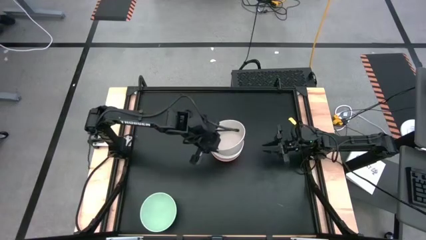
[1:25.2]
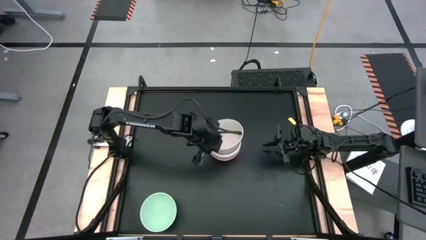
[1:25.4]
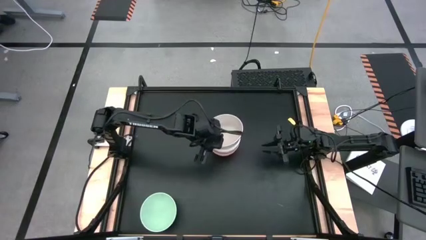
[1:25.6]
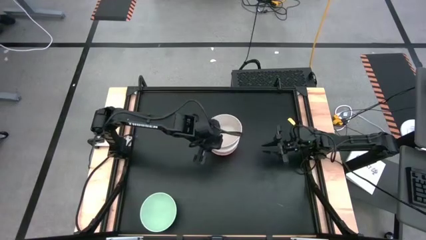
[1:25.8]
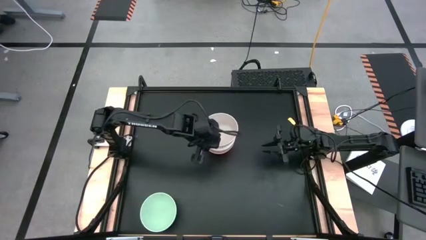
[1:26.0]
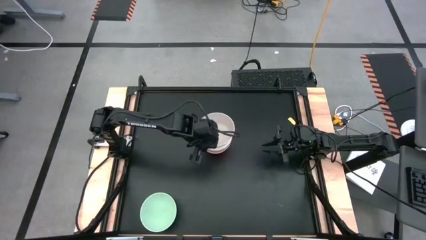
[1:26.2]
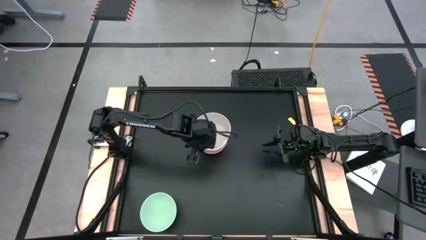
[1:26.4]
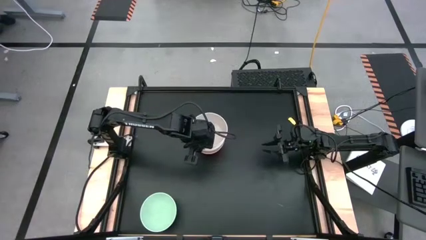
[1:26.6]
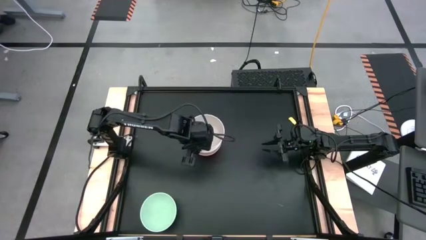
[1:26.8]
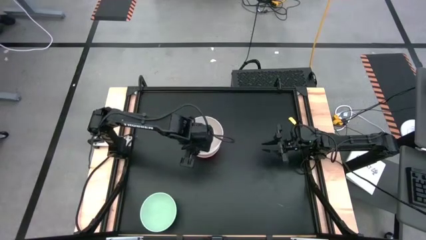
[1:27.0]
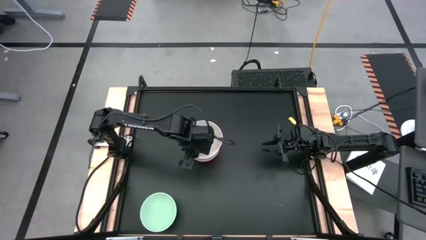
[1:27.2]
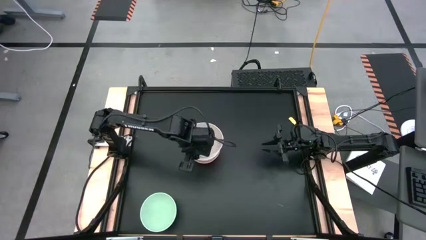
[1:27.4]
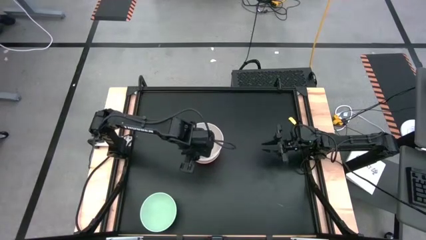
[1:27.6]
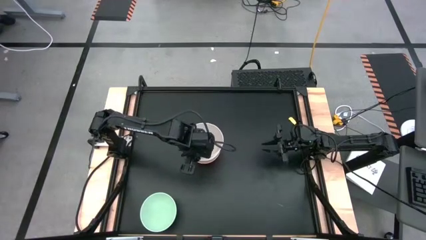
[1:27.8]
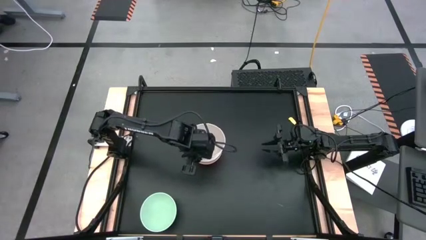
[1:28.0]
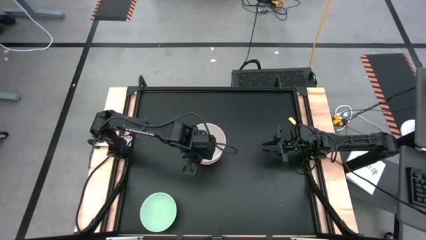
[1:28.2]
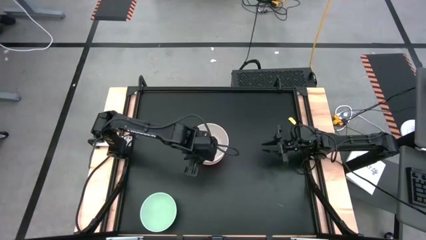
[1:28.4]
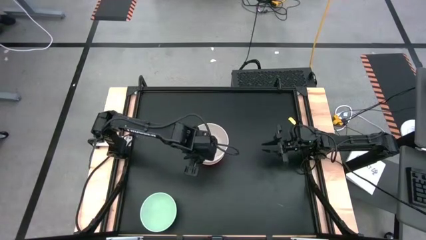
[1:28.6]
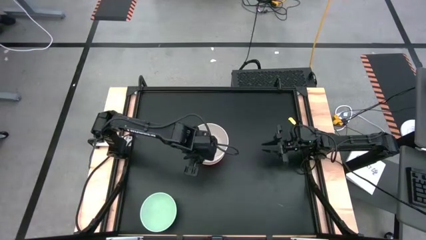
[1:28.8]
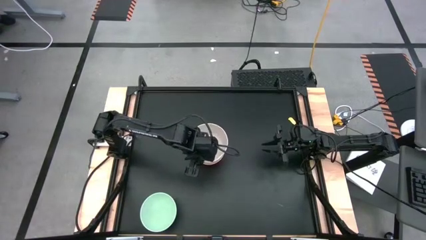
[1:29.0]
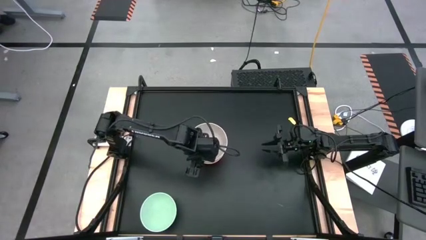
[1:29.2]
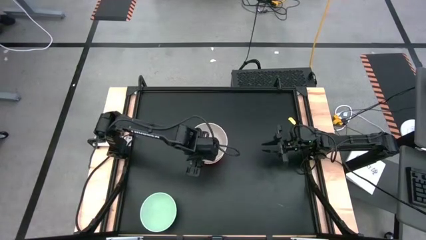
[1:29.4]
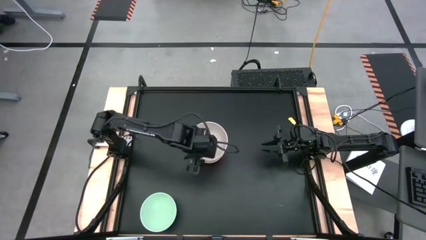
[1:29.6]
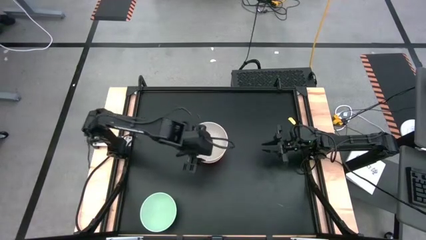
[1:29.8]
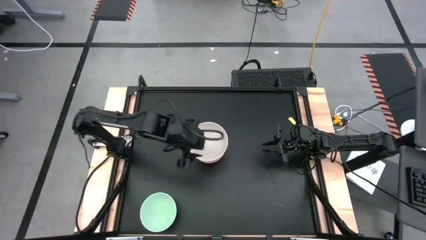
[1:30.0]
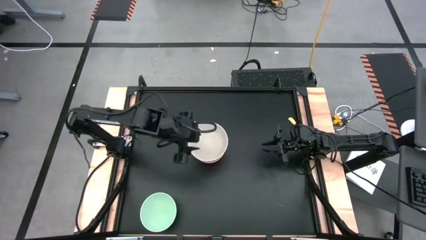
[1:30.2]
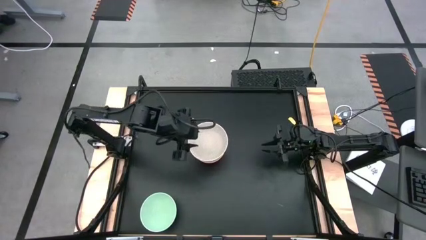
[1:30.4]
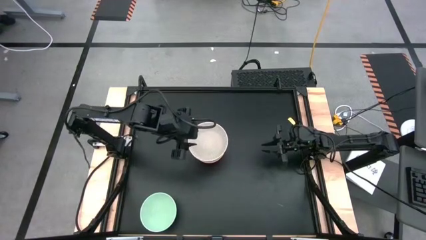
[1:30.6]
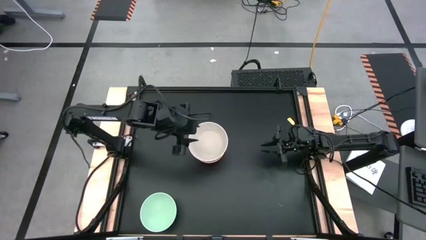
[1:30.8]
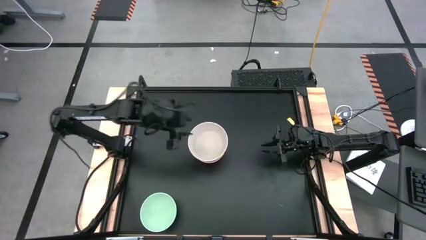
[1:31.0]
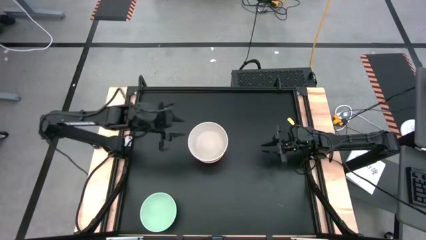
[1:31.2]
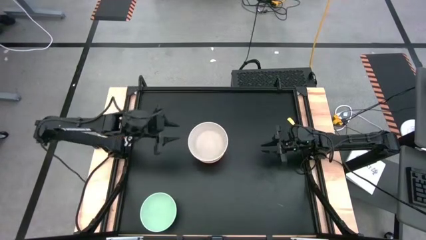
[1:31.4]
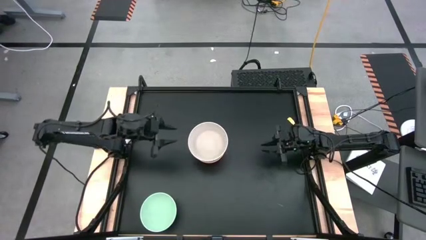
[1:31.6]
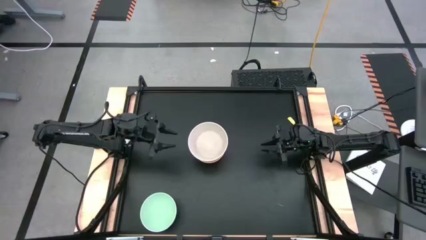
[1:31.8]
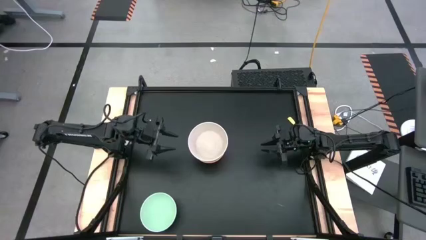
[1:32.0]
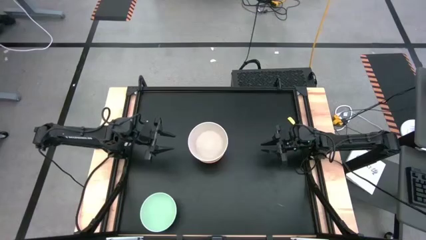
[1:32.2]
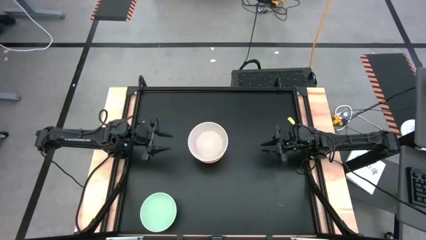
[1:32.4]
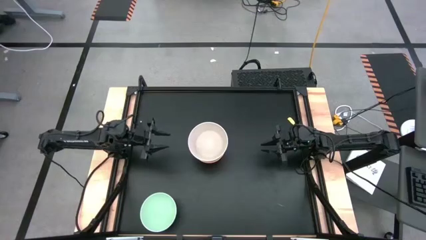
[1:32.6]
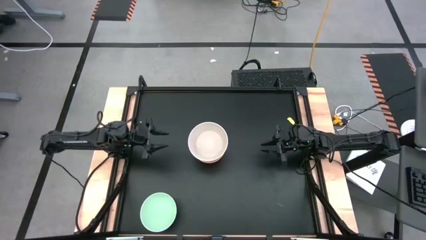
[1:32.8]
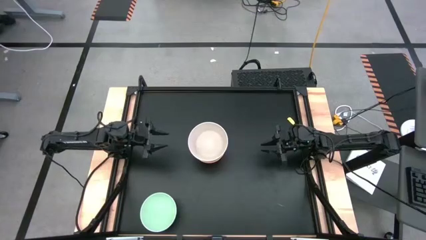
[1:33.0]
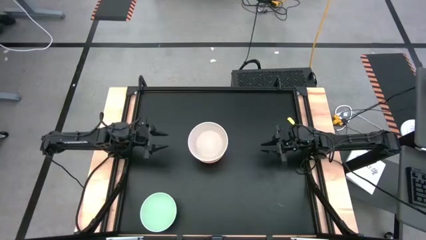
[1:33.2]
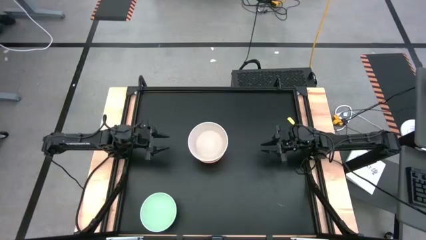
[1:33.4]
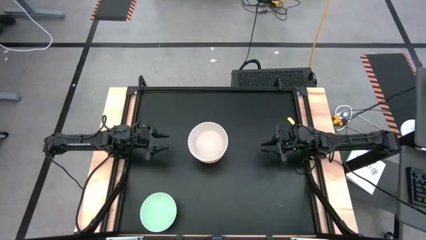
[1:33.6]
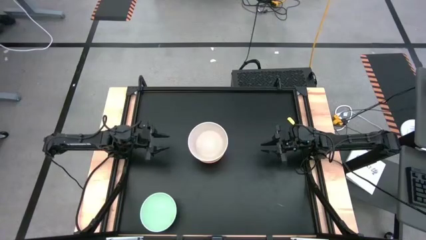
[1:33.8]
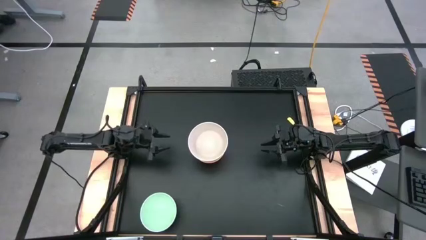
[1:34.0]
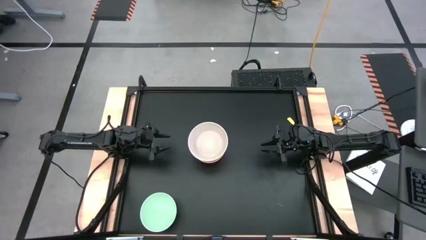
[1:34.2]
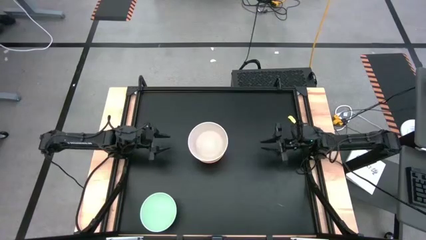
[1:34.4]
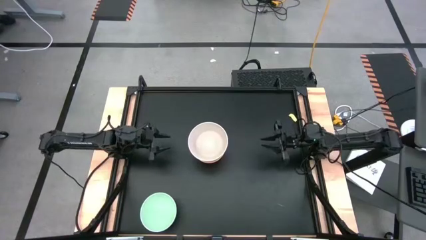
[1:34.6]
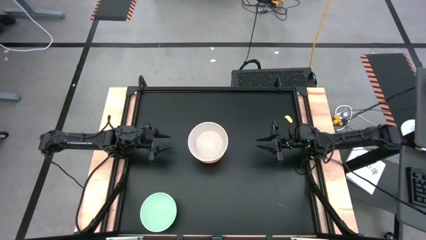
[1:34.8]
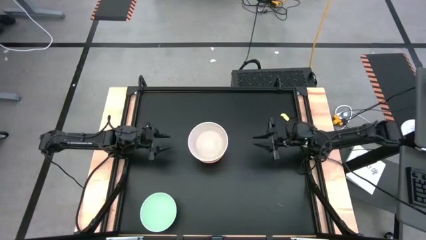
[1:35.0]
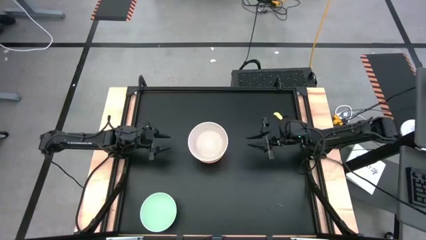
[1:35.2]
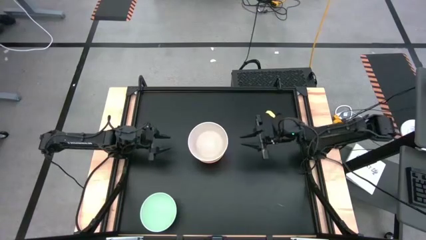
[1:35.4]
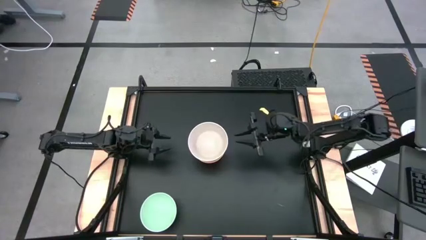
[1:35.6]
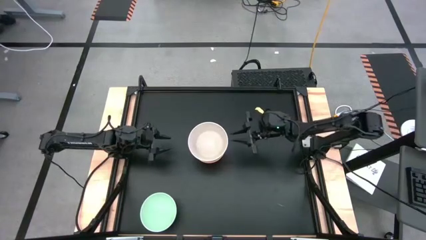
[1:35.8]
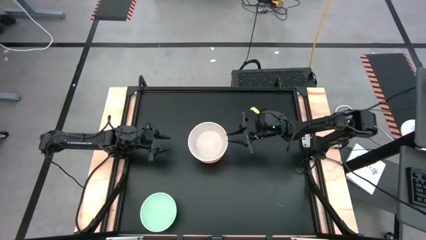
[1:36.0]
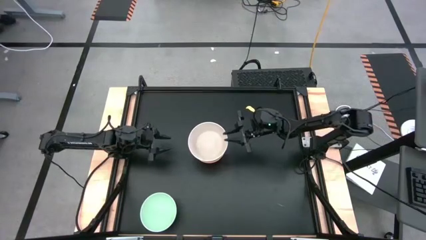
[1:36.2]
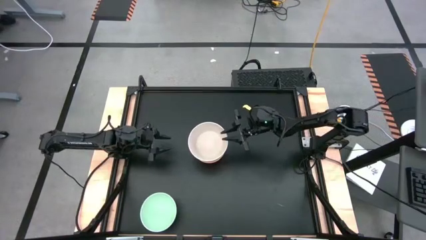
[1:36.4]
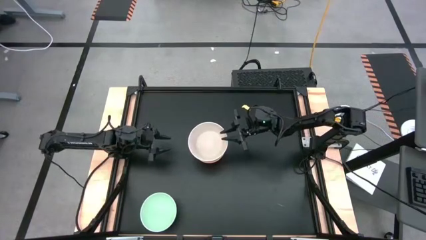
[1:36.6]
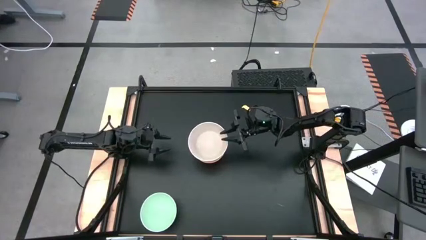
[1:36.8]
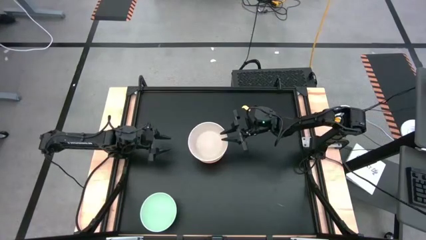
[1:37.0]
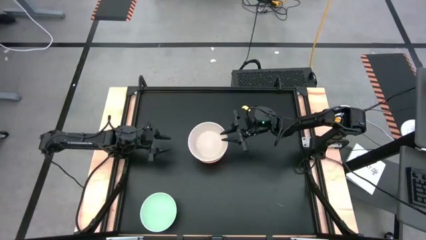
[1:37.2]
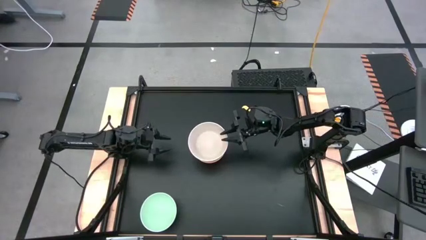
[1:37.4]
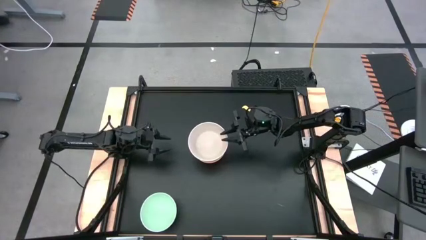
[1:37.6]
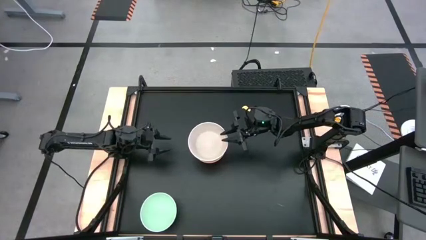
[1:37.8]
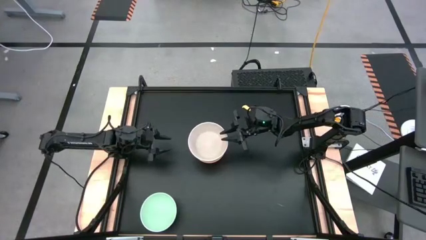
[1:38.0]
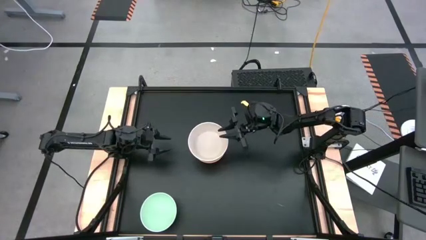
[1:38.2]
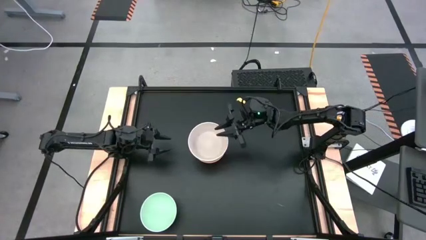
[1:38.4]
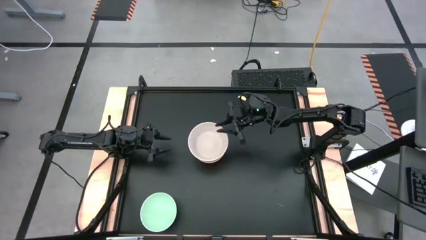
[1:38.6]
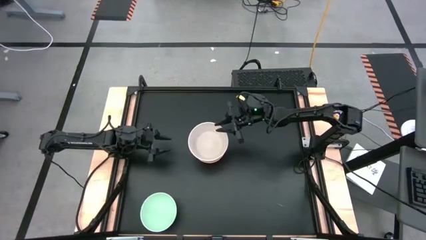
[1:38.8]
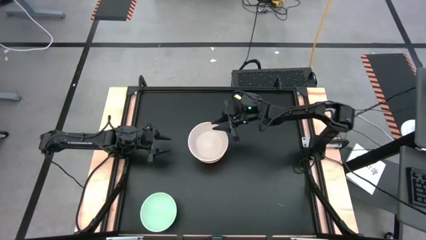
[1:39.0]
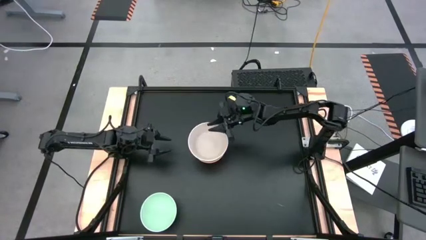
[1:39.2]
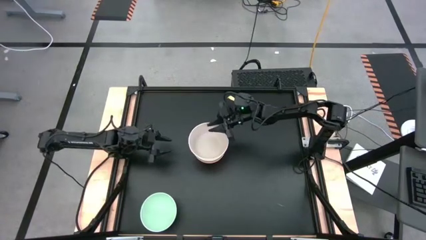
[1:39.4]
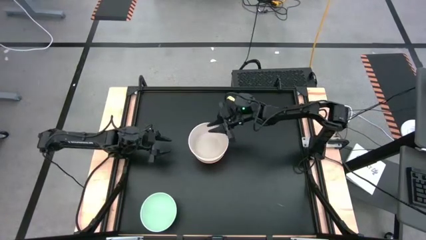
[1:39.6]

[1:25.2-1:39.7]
Task: Nest bowls inside each other
Stack the gray bowl on top of the white bowl

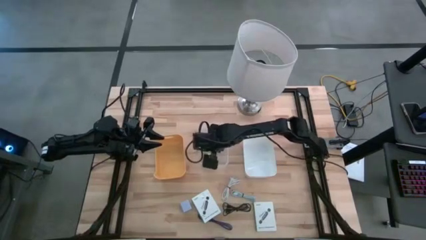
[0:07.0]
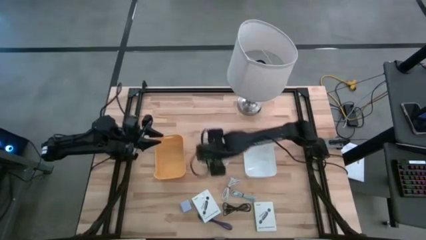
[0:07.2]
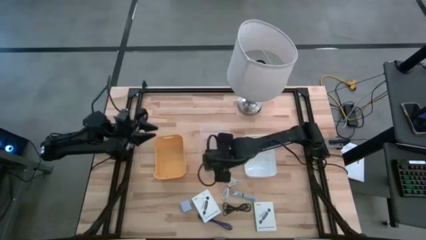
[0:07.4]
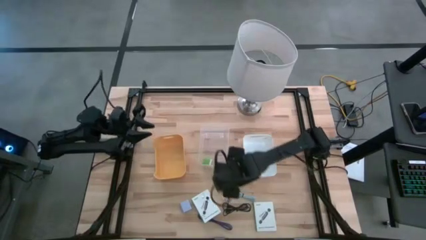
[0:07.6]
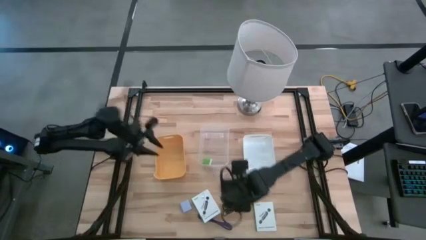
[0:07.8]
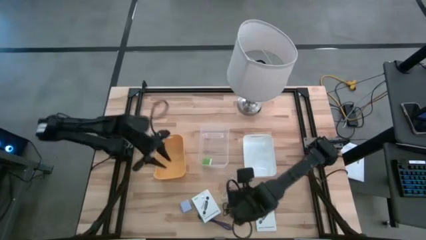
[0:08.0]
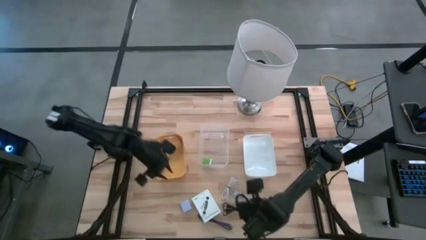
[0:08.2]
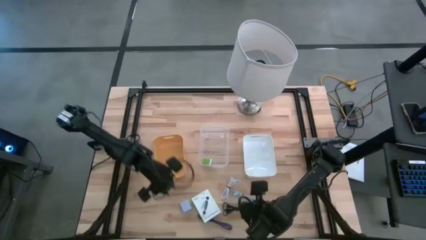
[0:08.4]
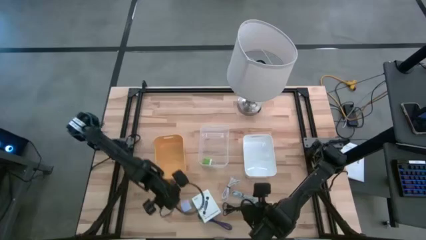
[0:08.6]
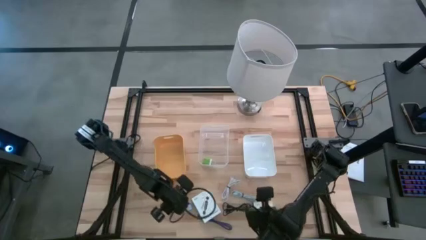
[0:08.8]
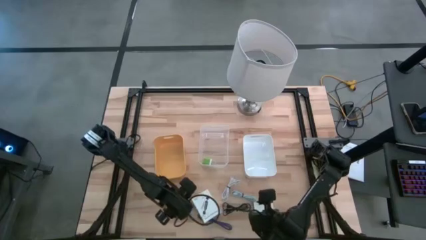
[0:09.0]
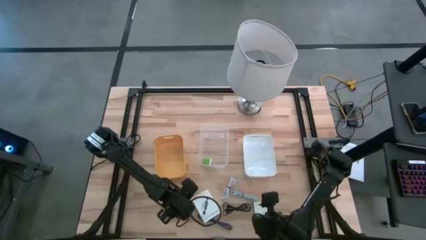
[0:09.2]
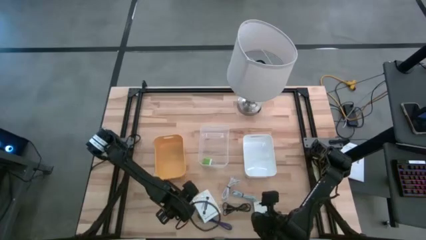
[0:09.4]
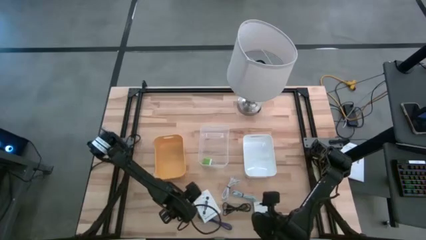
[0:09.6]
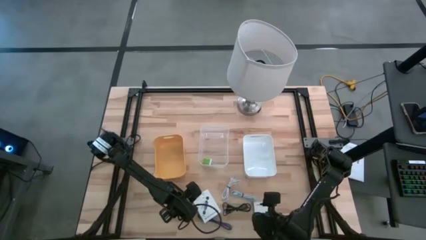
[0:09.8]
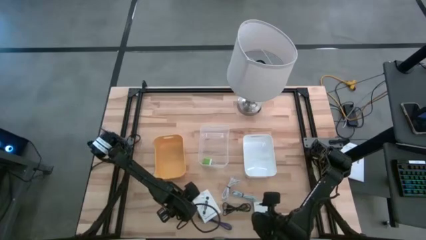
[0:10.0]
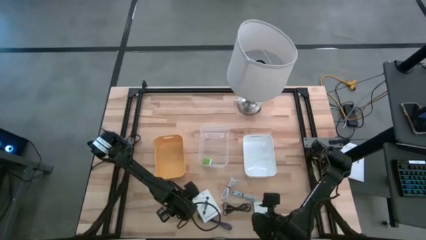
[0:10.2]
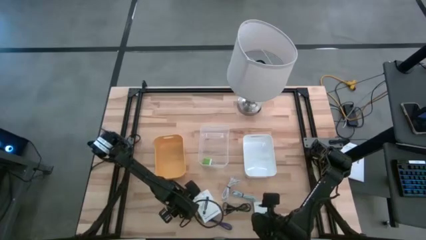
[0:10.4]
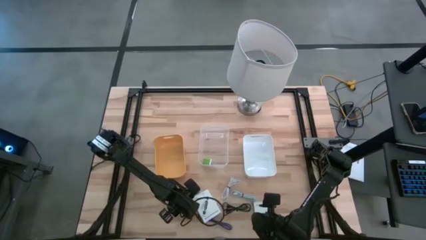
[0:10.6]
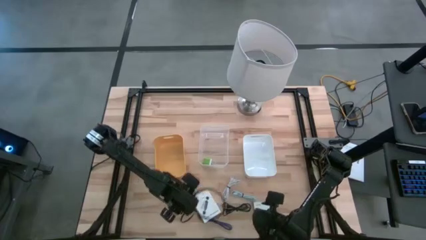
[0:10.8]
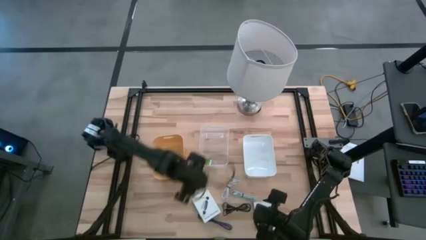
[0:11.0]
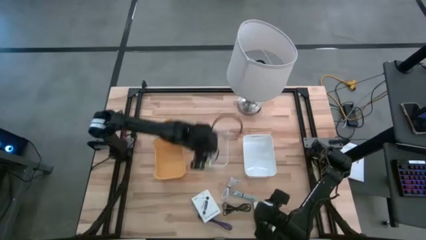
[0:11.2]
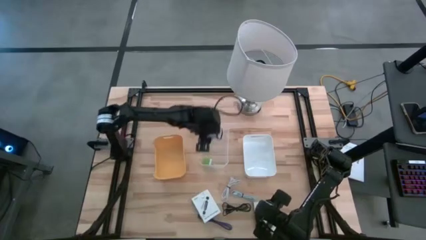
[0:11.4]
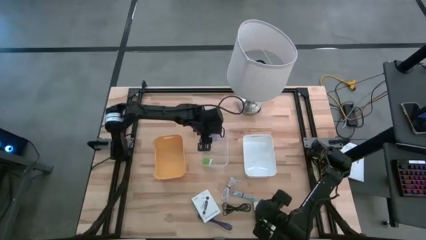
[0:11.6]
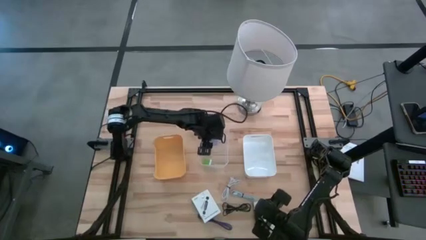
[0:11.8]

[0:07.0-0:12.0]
Task: Pick and place items into bin
Put the white charger adapter into the transparent bin
